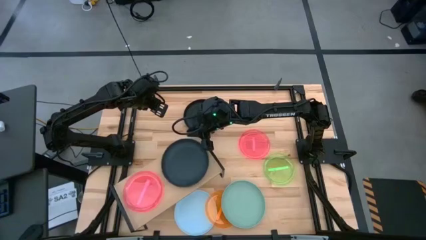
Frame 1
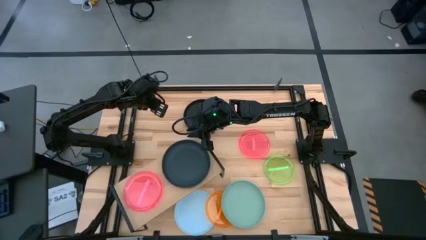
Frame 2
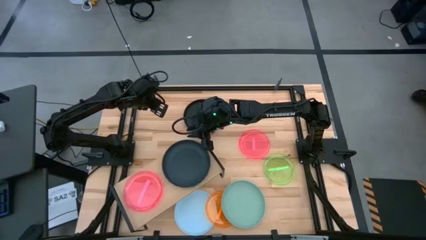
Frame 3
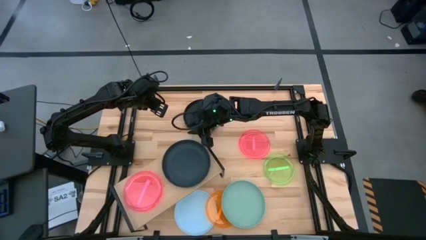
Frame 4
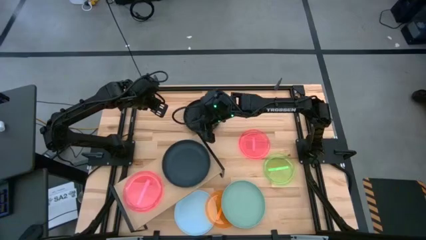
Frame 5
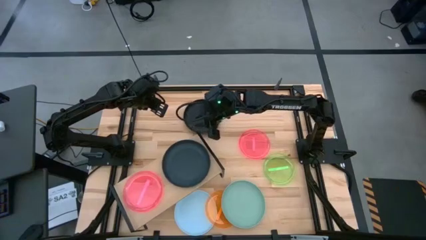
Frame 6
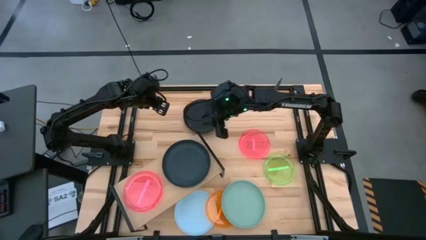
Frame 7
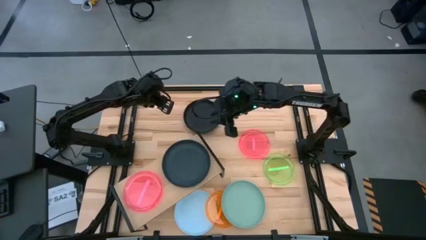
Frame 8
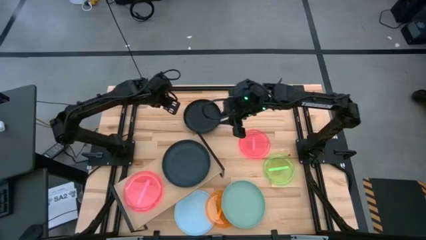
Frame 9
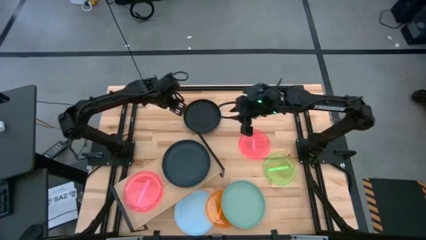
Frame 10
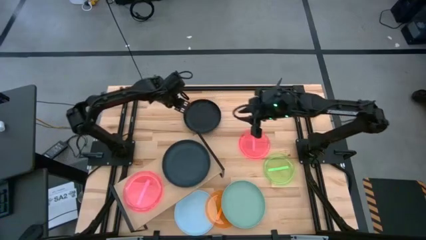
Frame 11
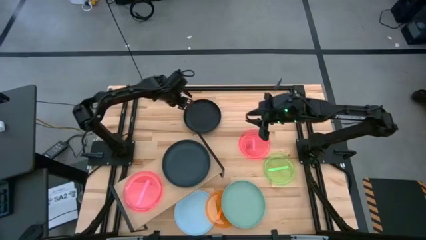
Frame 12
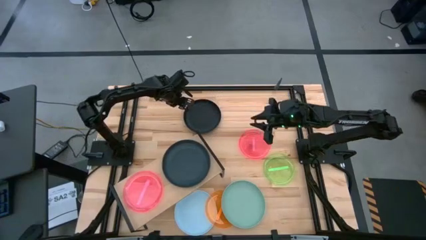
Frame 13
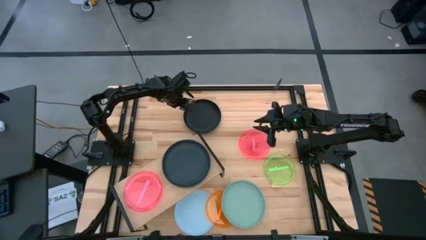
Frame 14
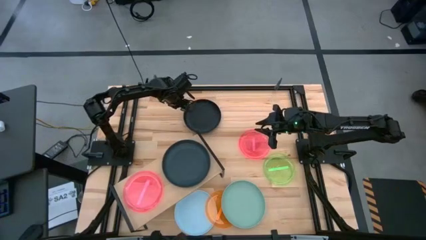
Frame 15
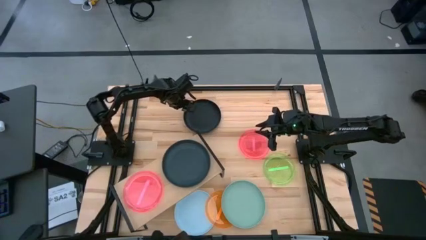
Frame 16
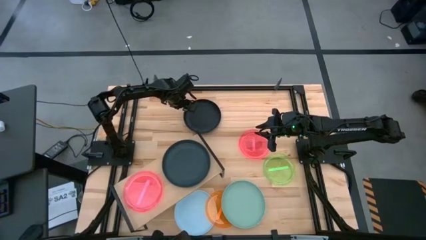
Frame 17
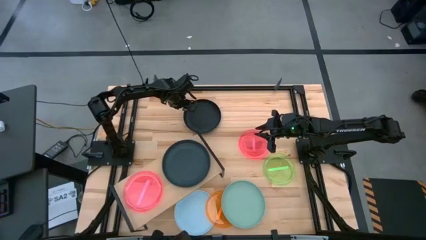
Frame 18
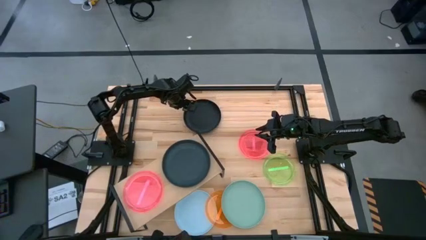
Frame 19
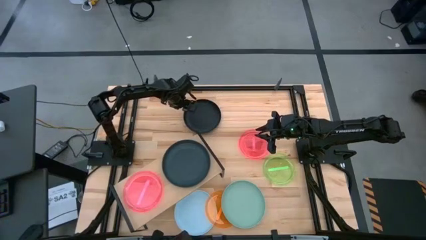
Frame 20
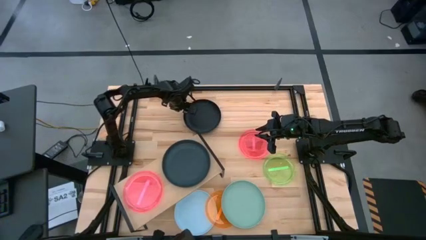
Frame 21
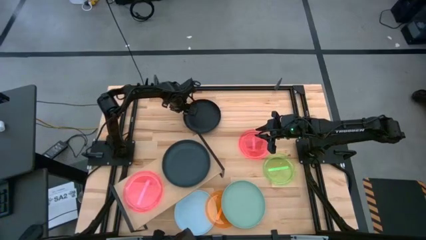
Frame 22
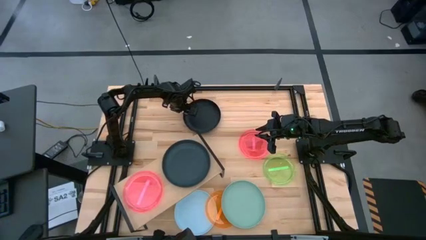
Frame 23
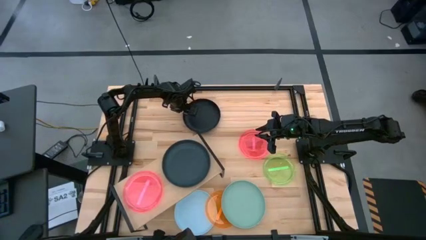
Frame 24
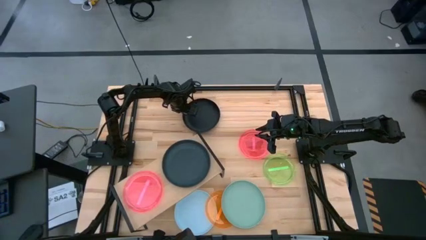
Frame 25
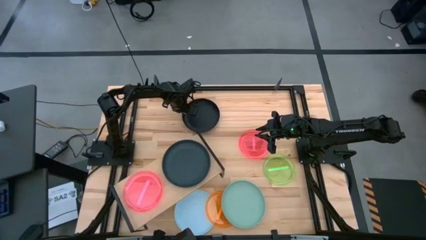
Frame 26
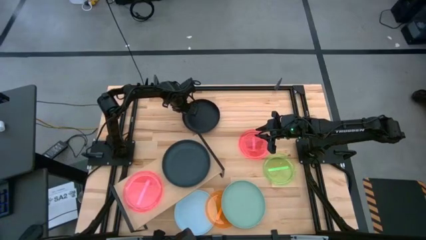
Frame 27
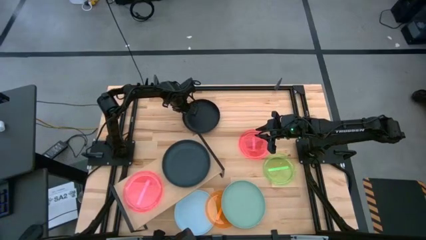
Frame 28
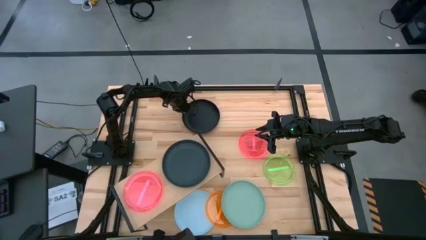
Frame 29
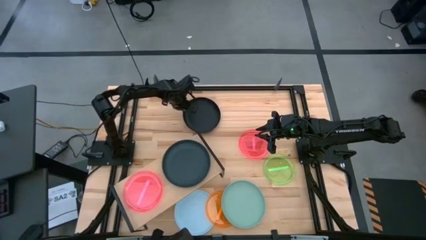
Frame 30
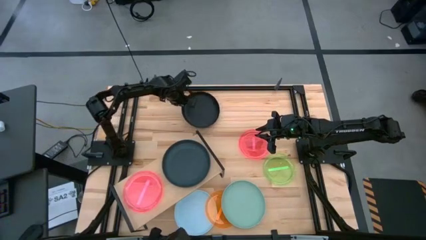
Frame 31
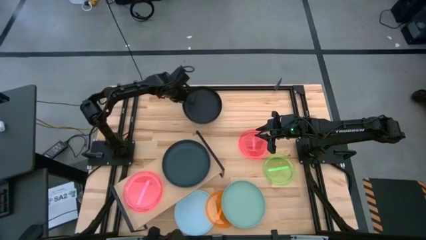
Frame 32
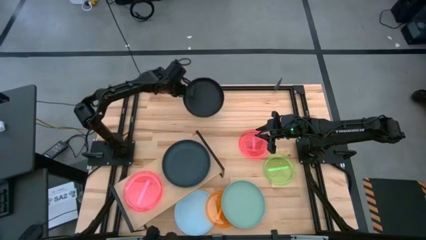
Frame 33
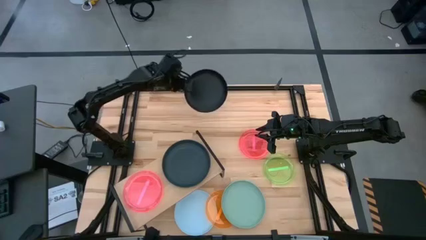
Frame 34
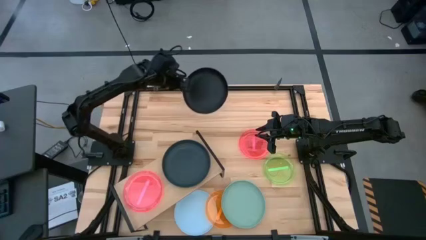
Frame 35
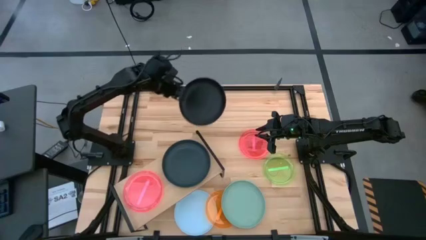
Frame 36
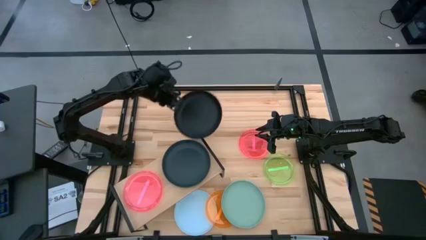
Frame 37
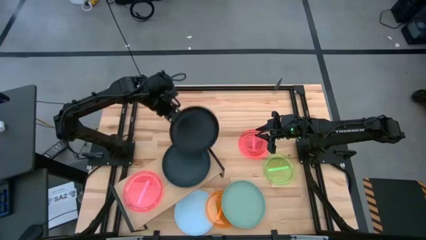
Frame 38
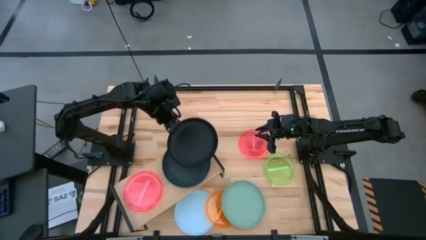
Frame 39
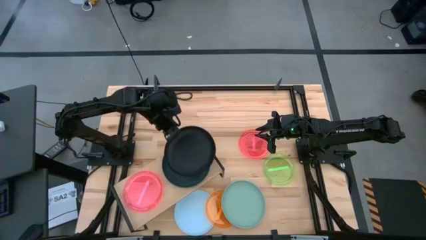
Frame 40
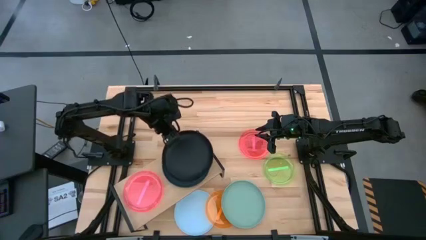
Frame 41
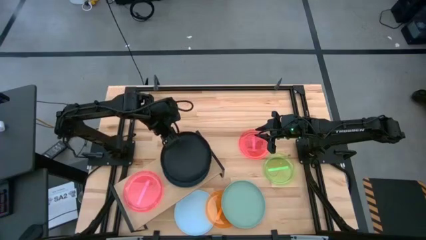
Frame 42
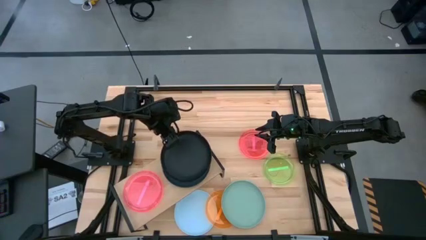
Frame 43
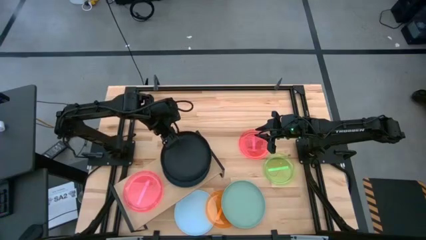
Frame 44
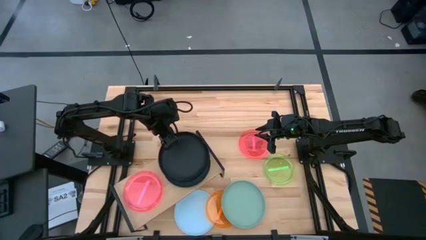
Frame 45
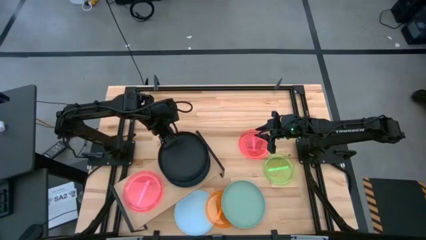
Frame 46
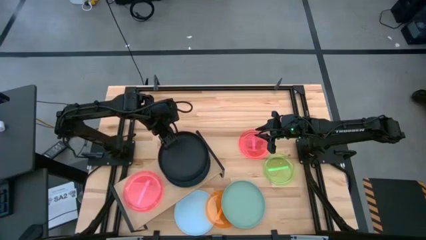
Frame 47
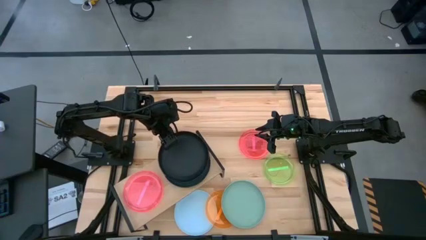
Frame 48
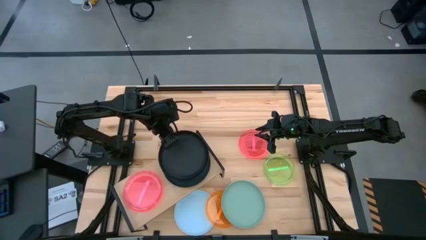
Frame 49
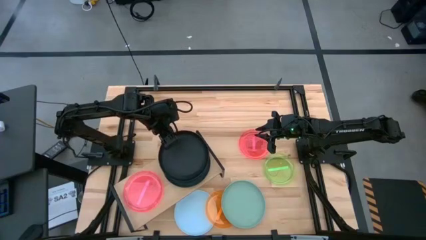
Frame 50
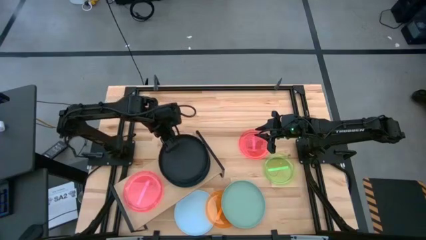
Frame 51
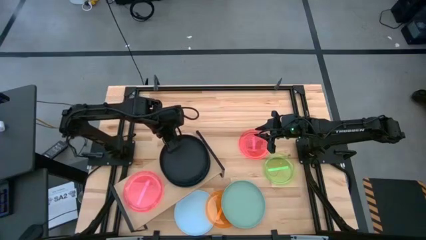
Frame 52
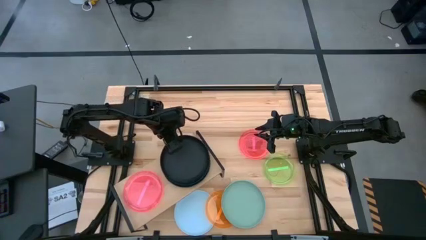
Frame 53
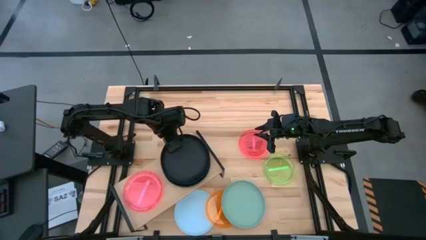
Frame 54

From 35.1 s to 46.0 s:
Task: Place and stack plates onto a shelf
Stack the black plate on top of the black plate on the shelf

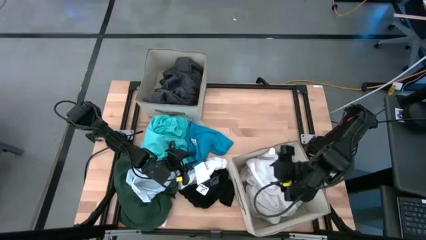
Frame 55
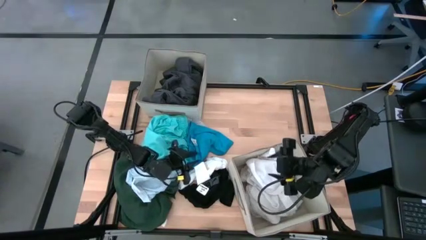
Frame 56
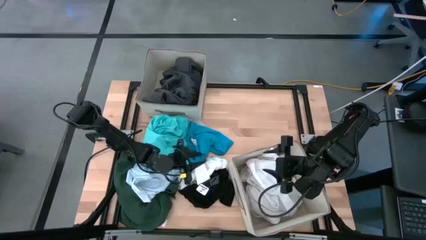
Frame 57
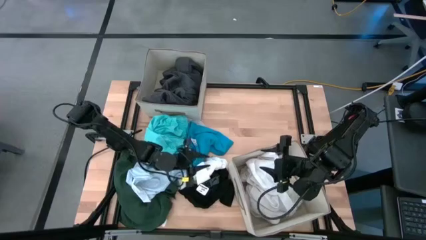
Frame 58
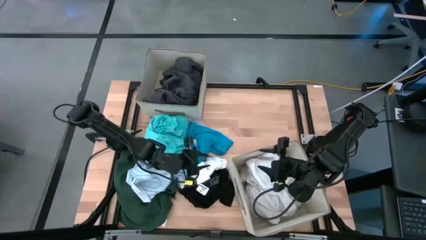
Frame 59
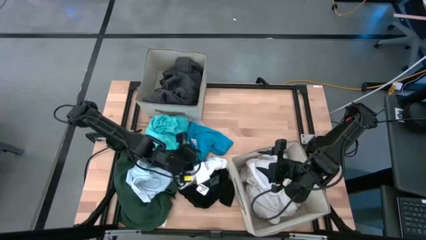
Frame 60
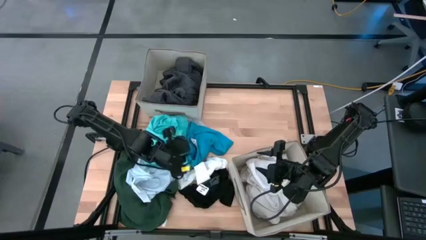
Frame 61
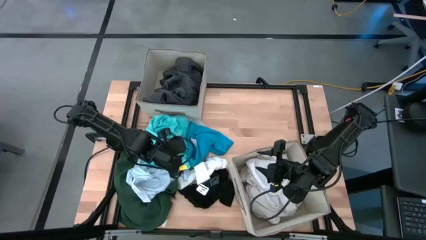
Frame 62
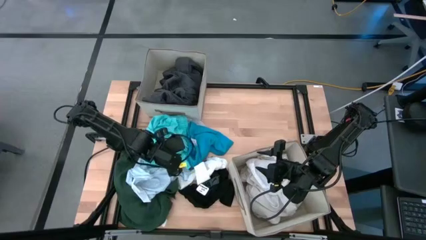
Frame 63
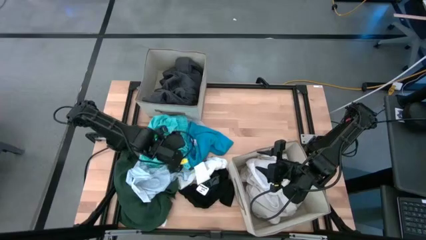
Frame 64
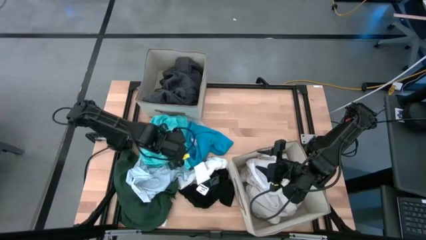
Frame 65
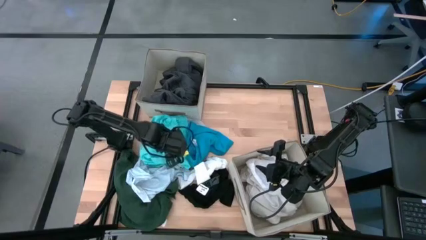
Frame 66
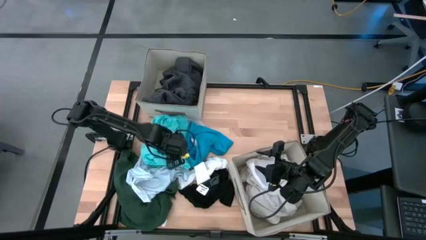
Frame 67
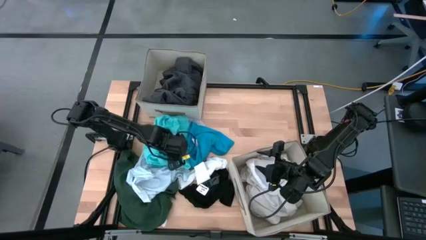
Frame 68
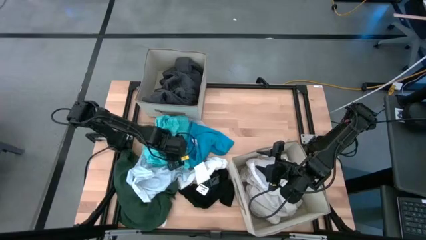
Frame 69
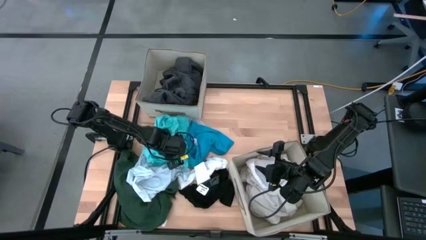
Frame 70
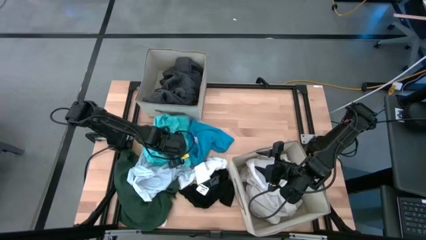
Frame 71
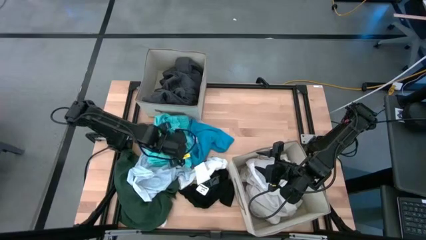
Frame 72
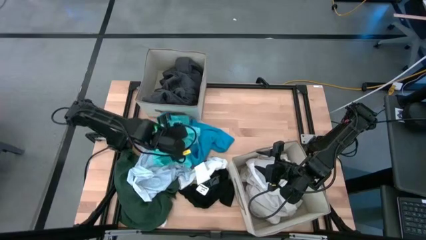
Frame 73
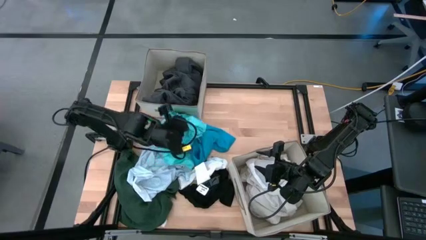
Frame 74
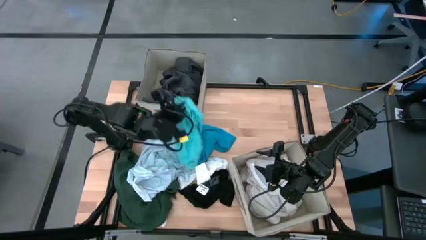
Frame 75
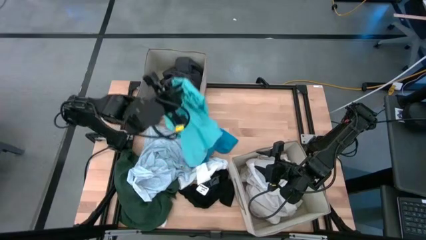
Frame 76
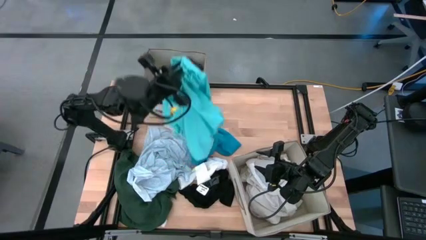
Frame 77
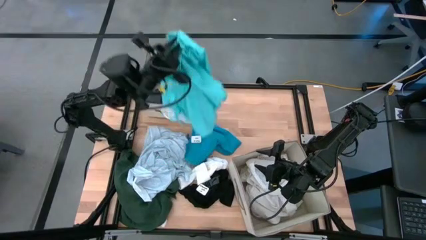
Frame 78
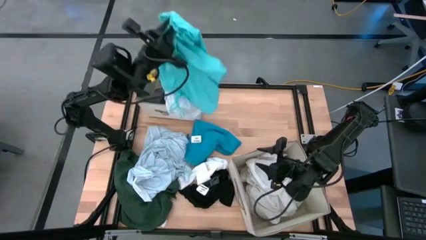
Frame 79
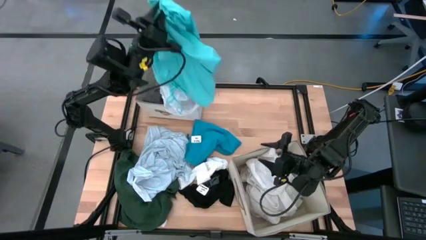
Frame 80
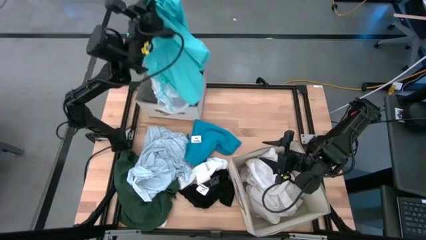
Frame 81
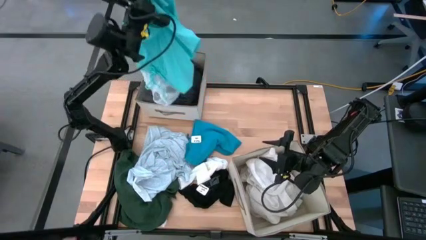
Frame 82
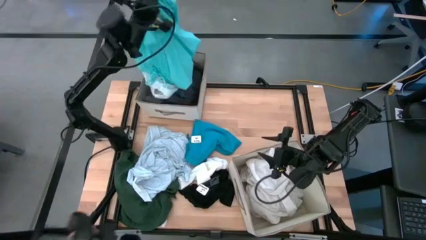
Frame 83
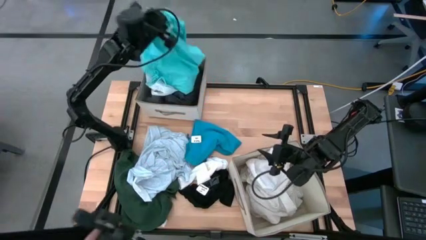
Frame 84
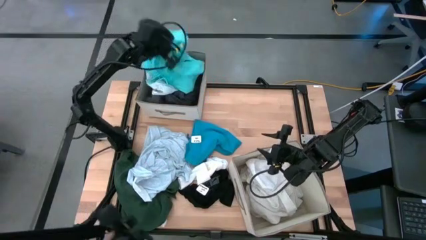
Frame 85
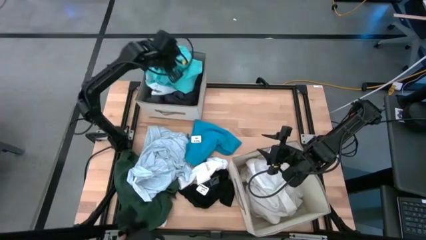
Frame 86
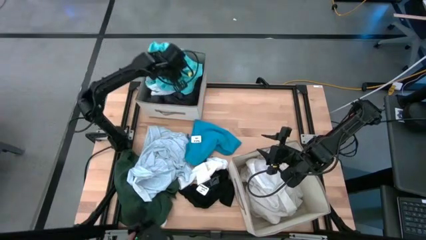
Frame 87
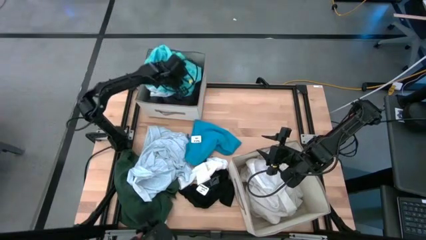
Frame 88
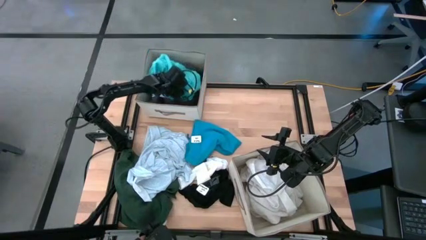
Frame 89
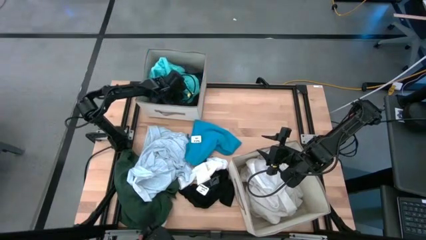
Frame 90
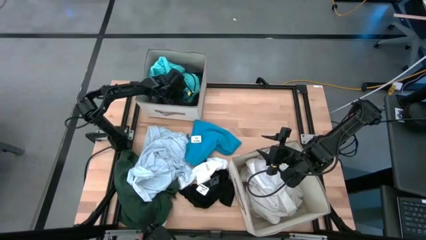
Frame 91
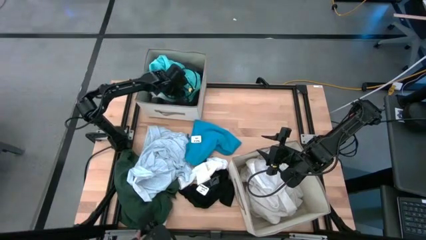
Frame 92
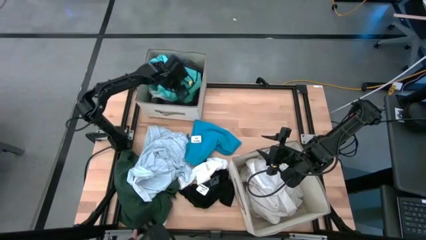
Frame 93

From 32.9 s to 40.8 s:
Task: Sort clothes
Put the light blue shorts into the top white laundry bin
